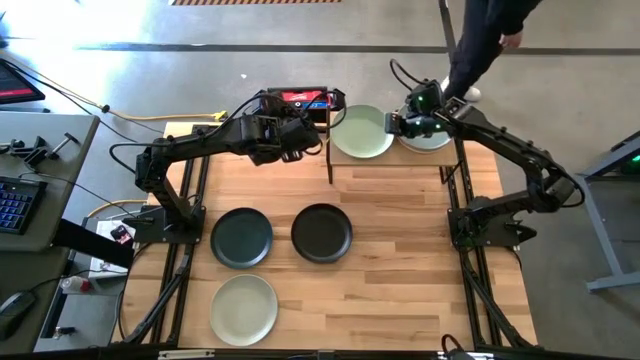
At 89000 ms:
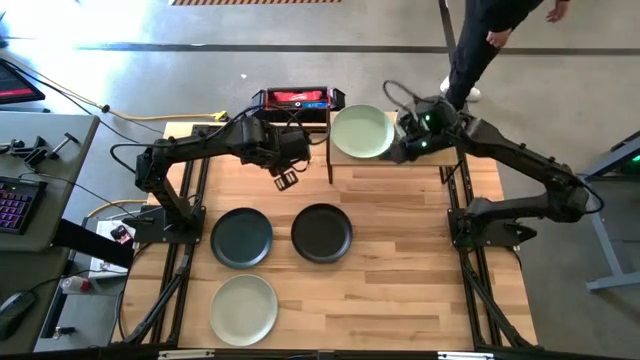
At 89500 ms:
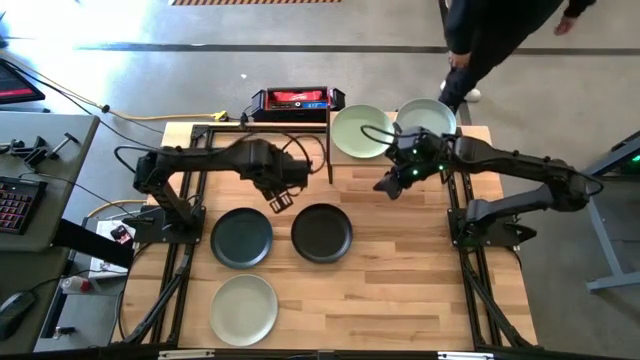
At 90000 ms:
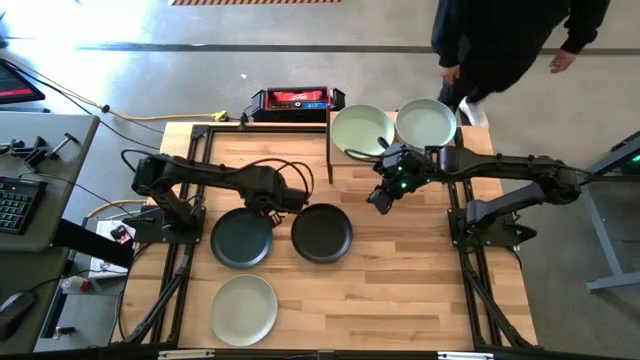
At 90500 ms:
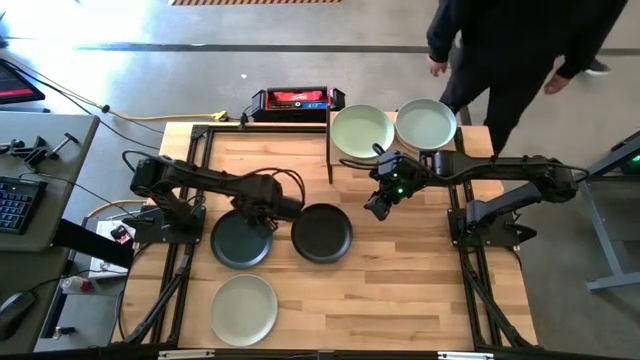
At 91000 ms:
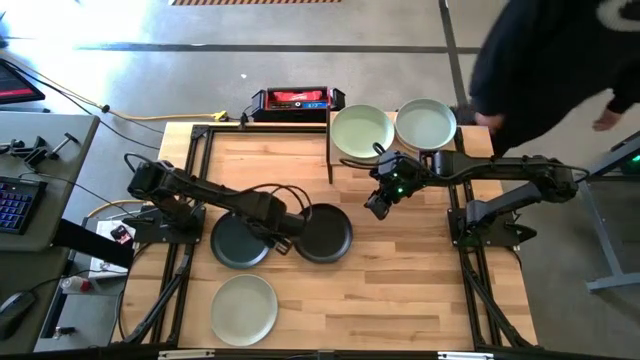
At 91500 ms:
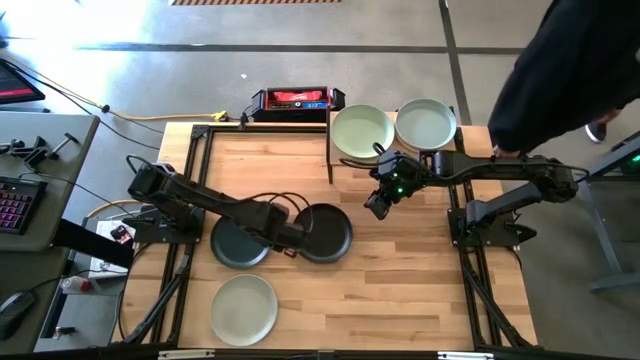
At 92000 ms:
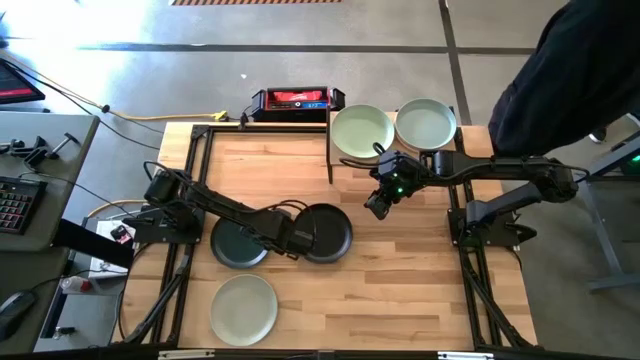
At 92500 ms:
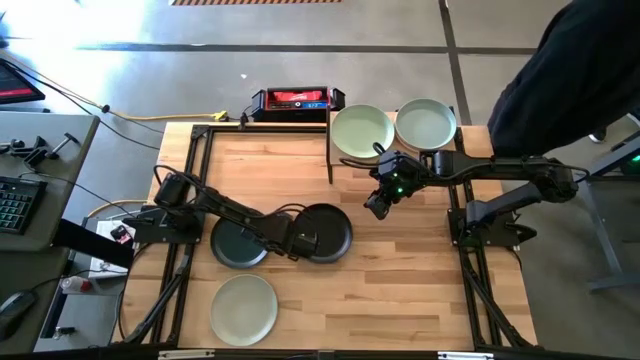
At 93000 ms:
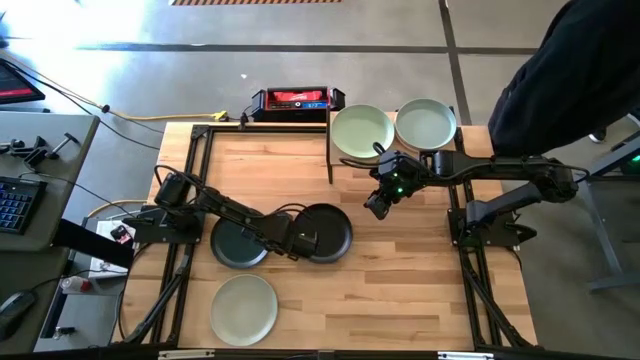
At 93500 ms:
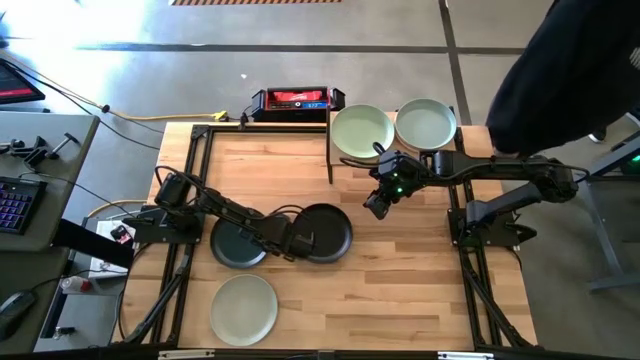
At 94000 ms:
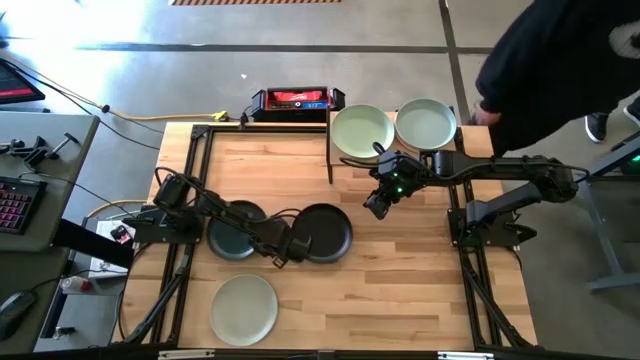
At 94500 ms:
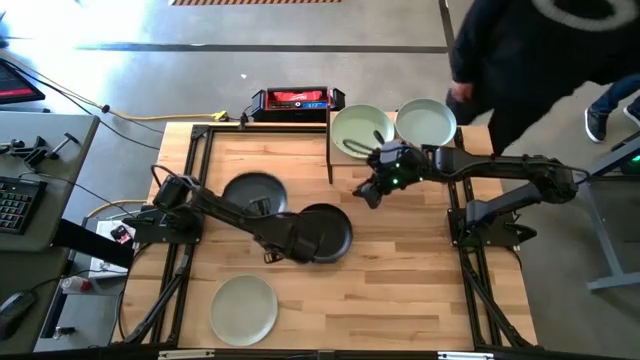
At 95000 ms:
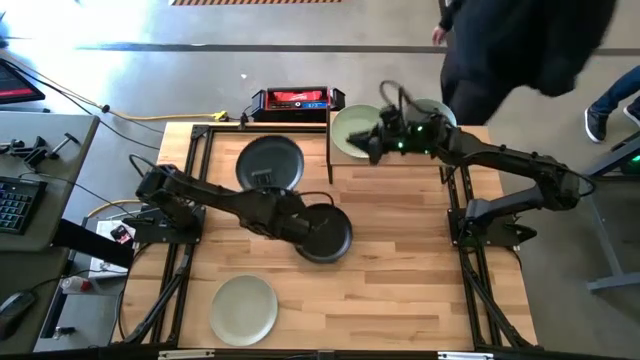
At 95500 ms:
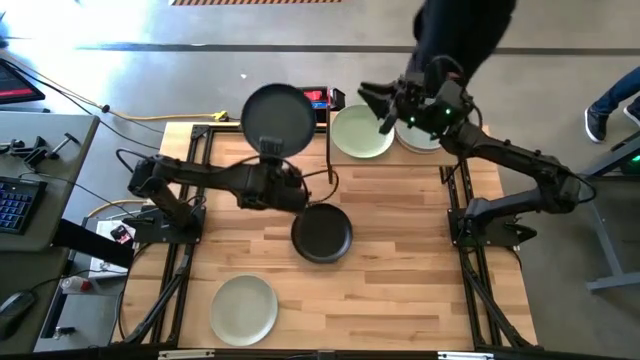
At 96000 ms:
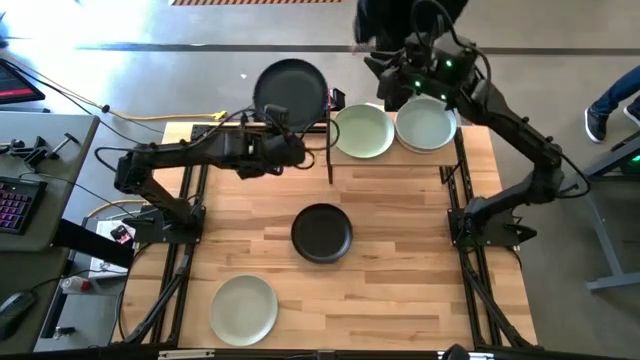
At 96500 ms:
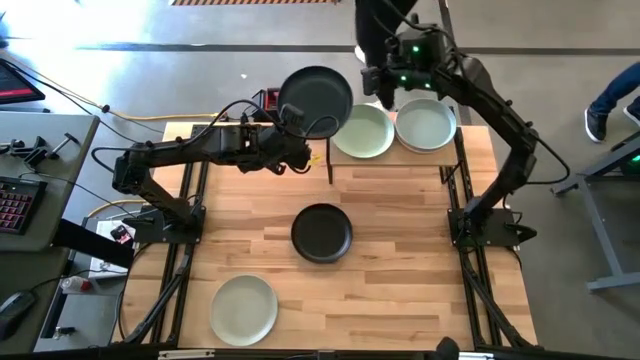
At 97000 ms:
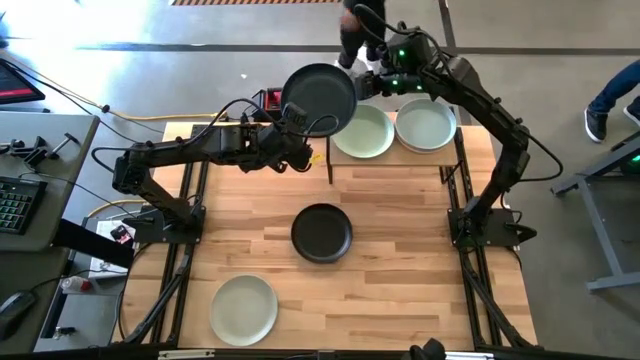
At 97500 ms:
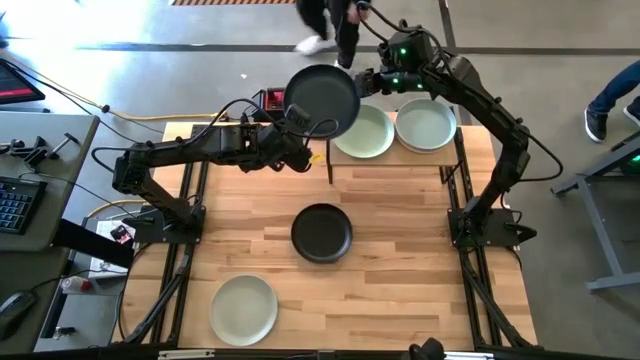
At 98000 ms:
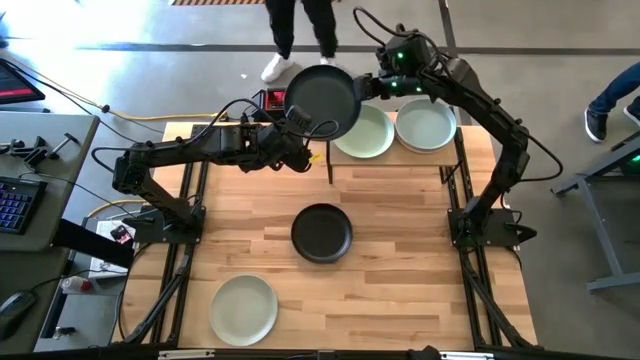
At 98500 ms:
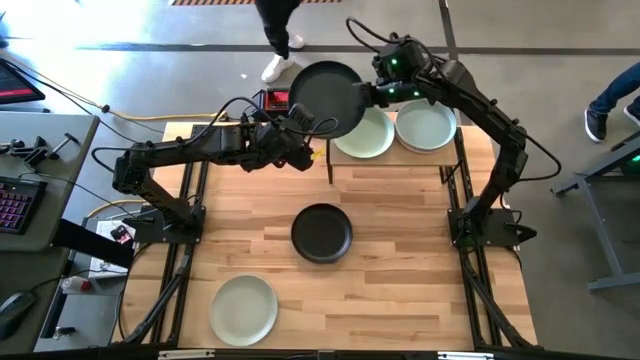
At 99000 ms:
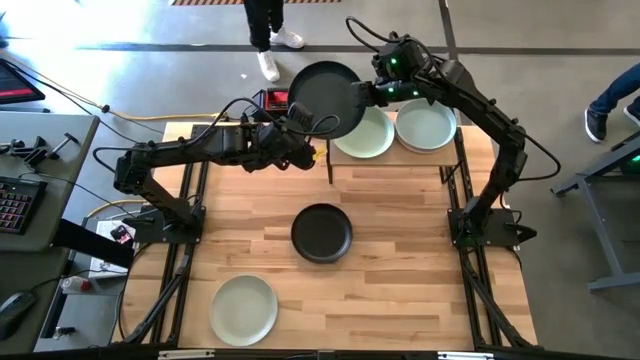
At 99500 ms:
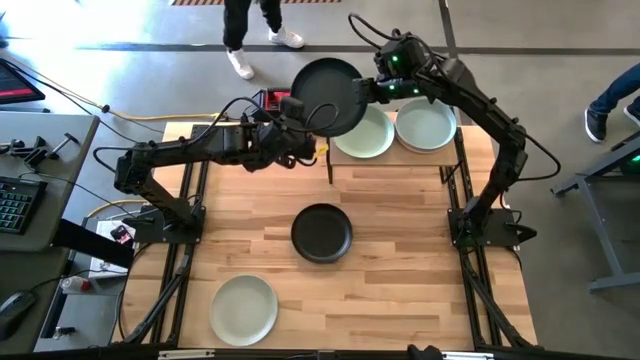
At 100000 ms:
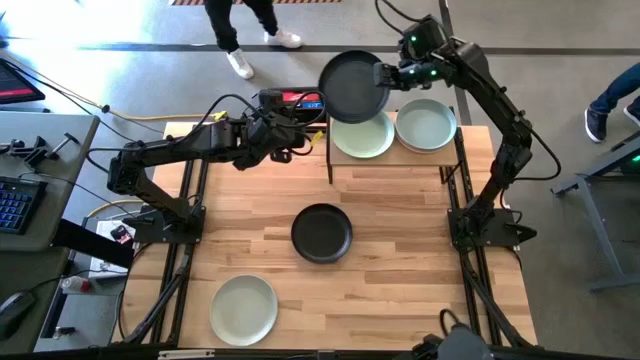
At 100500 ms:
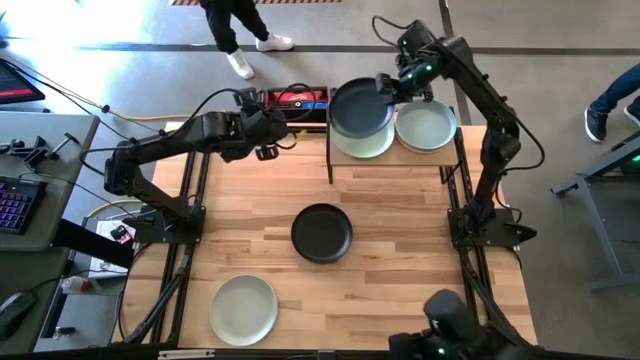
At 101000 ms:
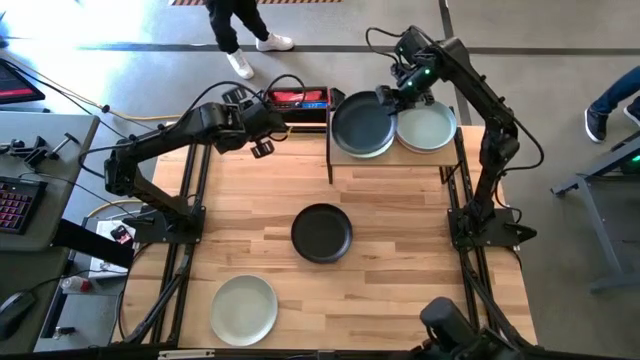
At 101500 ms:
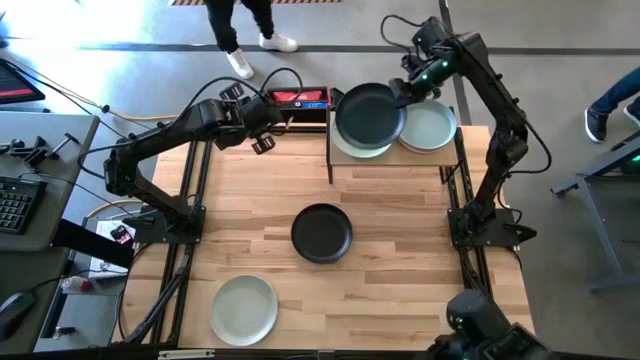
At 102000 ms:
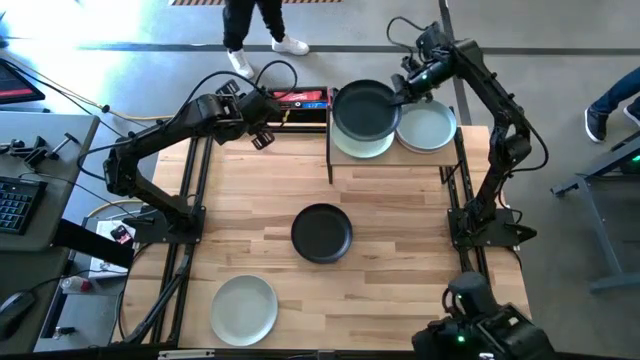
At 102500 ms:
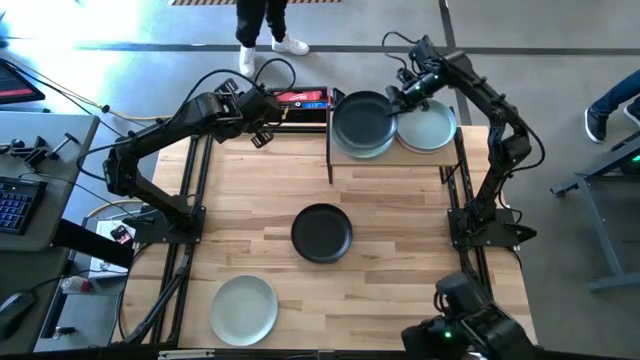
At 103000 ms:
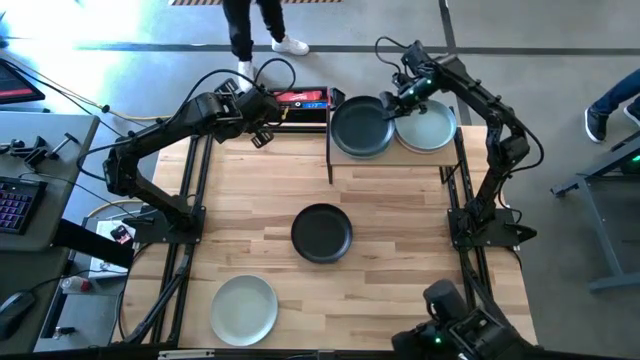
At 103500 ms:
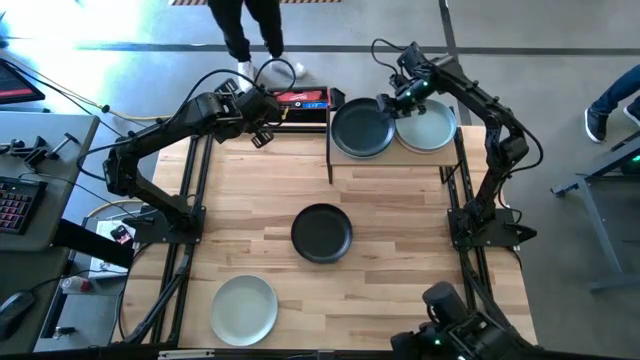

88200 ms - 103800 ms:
Task: Place and stack plates onto a shelf
Stack the dark blue plate on top of the light green plate on the shelf

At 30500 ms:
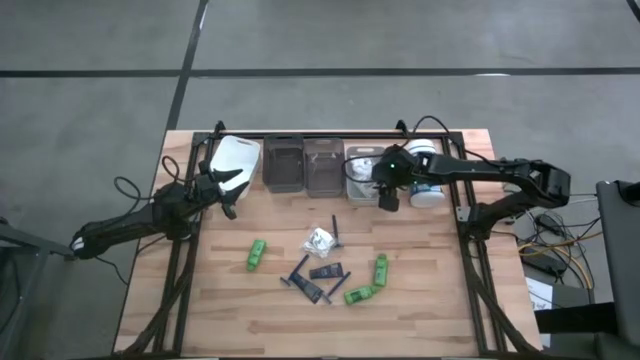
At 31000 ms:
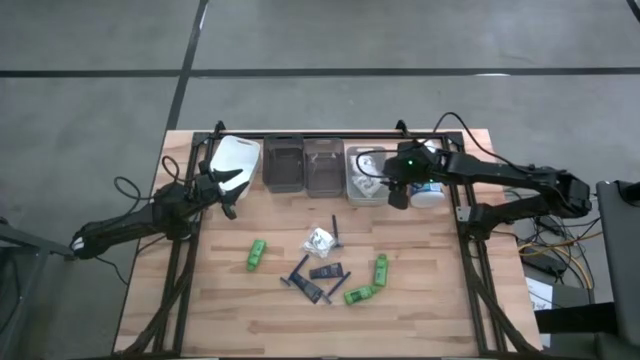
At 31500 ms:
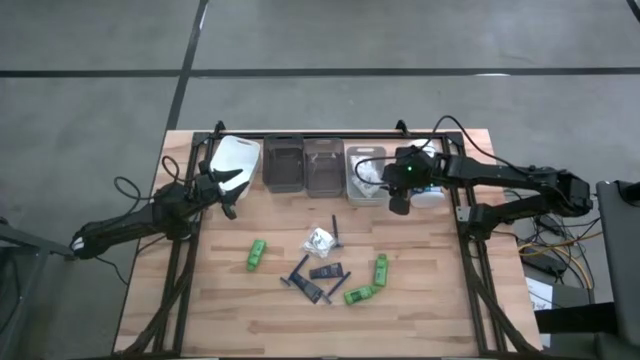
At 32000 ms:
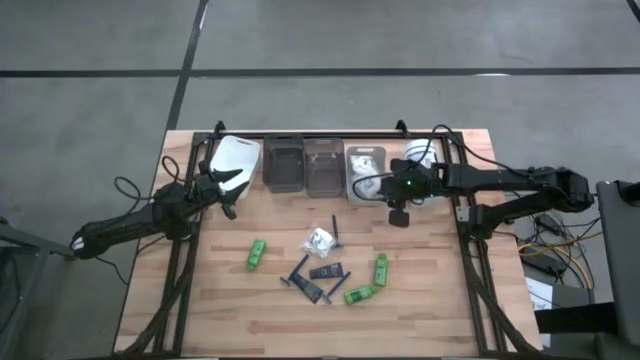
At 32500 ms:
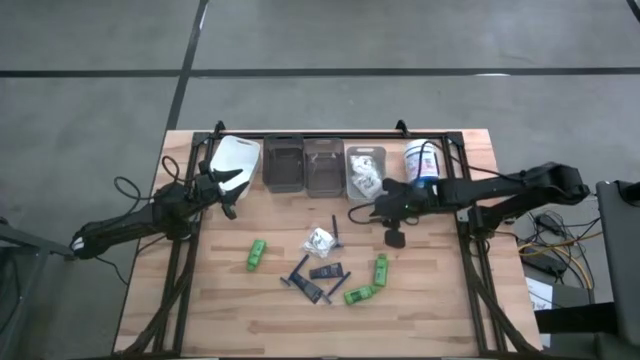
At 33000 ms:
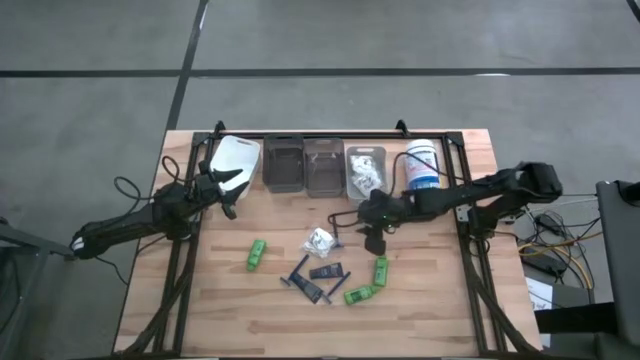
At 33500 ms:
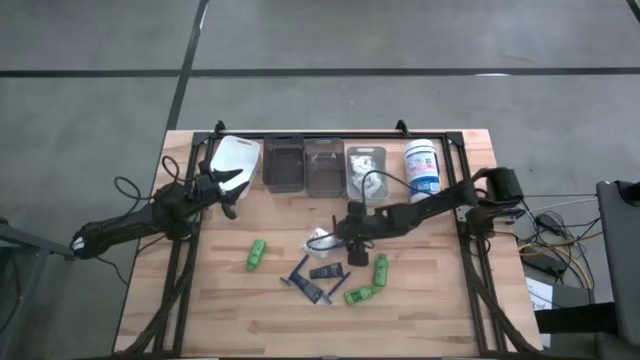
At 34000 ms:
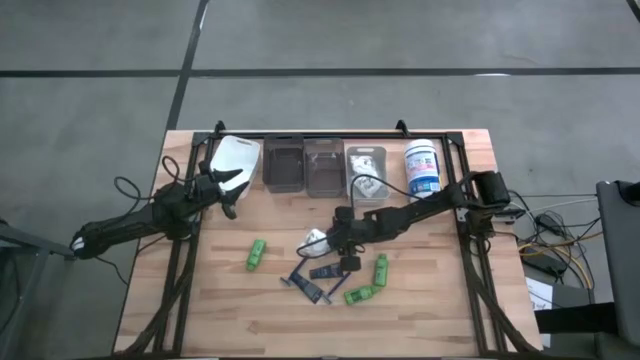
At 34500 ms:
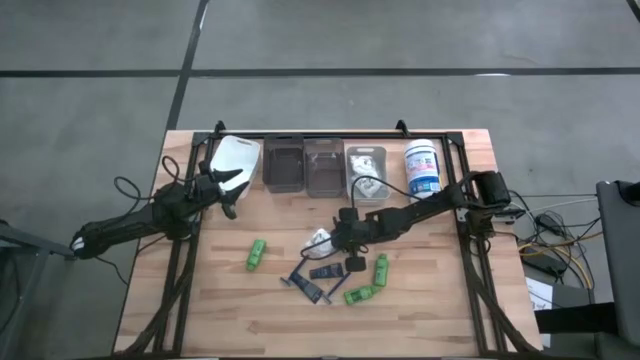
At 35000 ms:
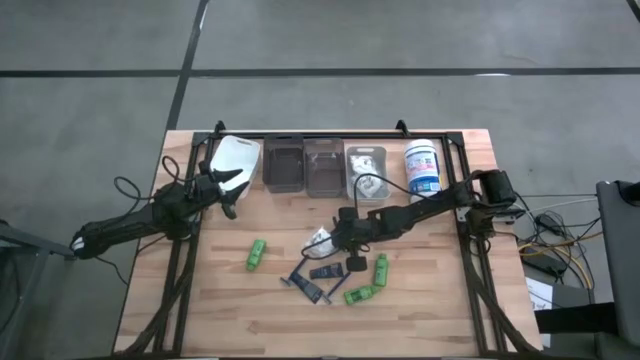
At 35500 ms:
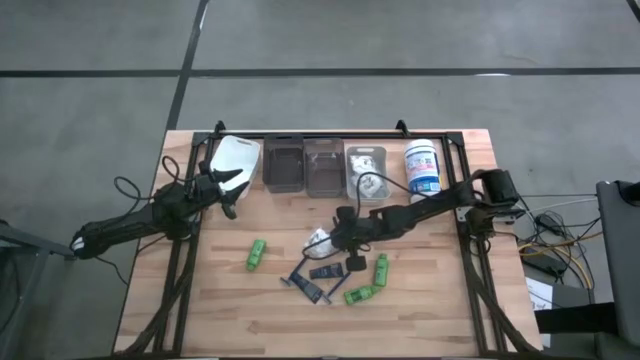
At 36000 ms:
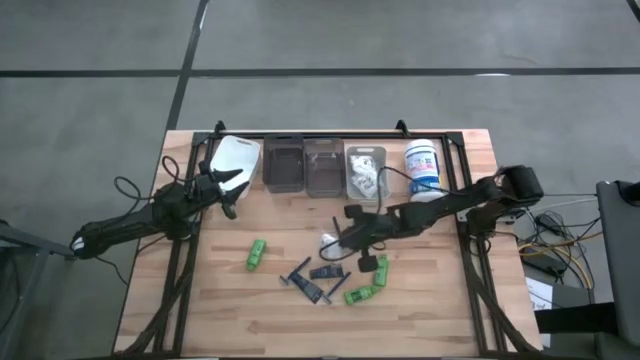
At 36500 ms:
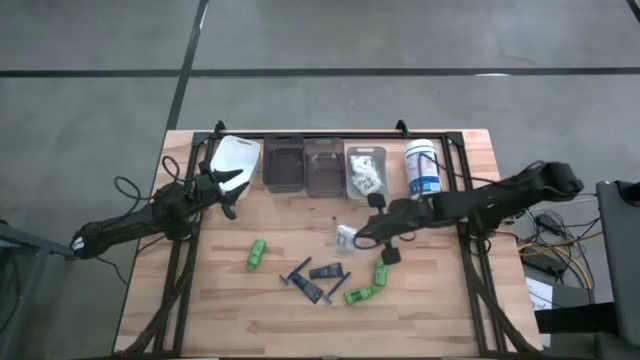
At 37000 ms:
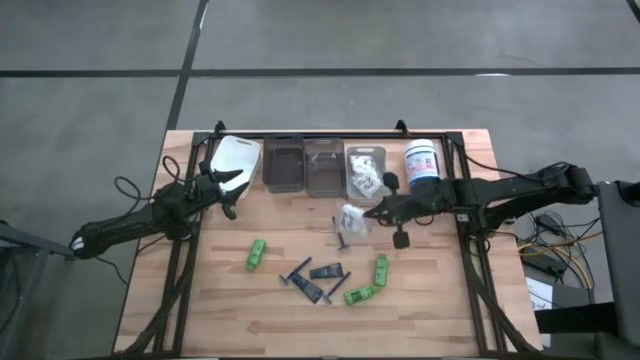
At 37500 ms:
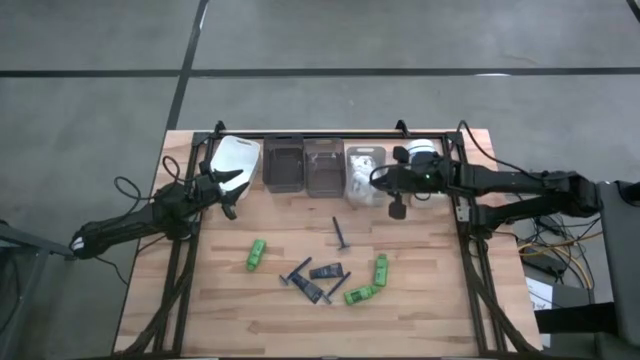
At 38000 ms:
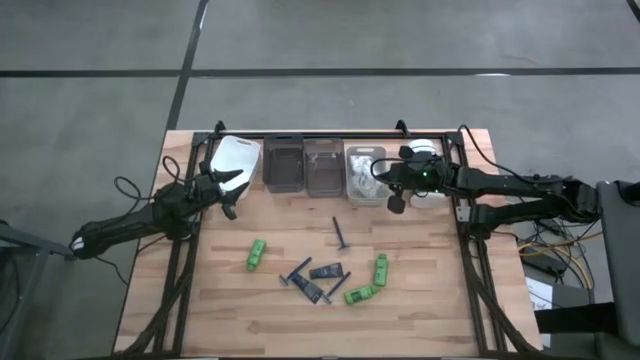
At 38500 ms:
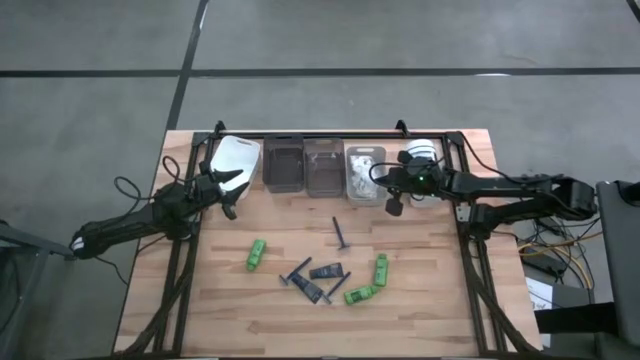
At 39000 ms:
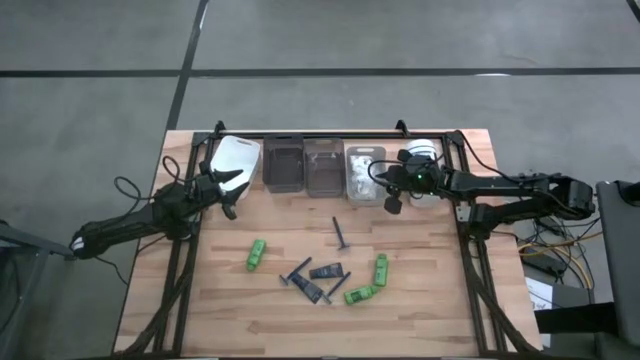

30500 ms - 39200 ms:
Task: Pick & Place Travel size toiletries
Put the cotton pack into the grey bin
